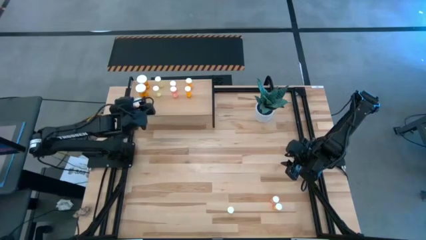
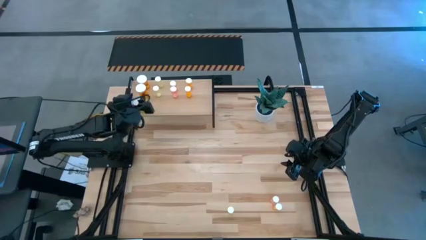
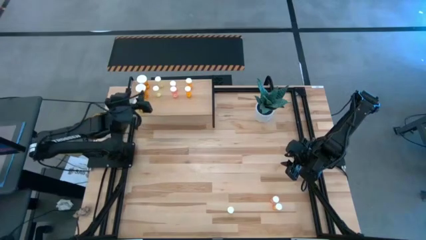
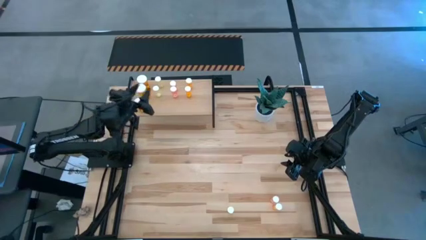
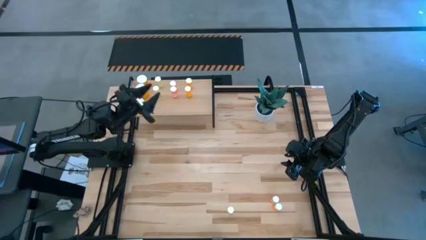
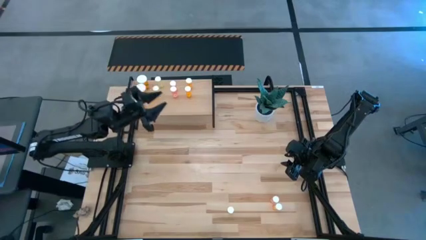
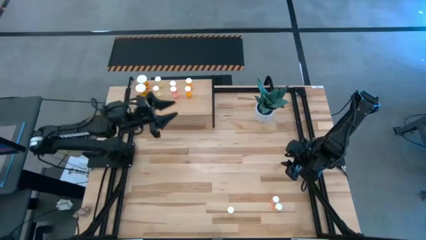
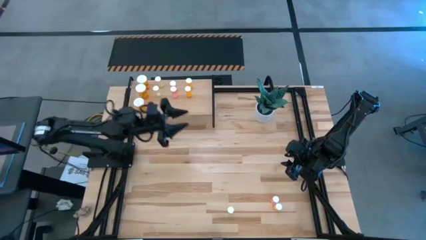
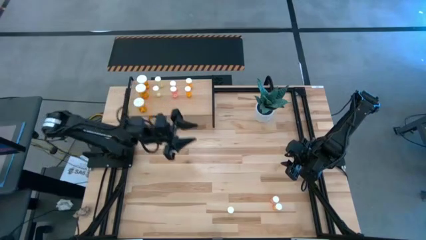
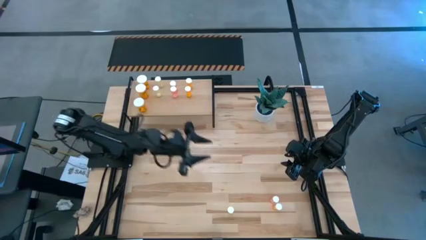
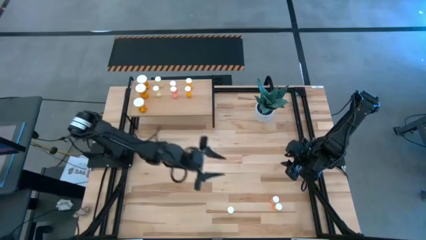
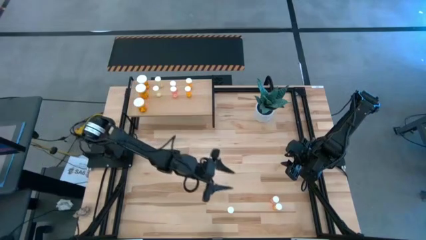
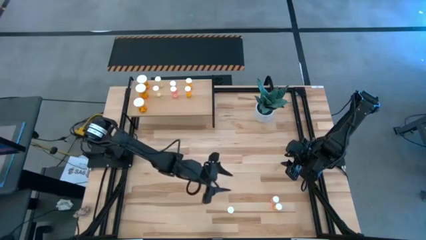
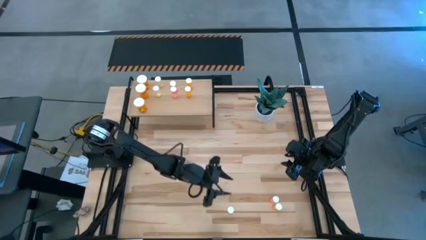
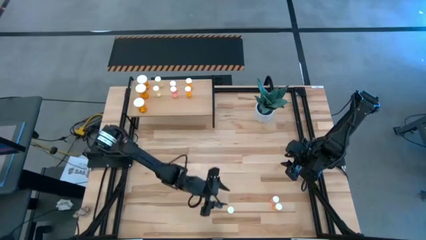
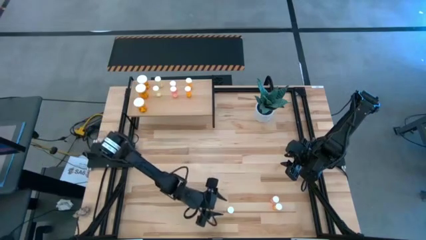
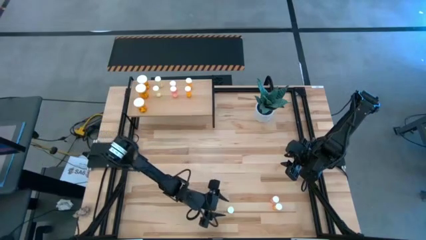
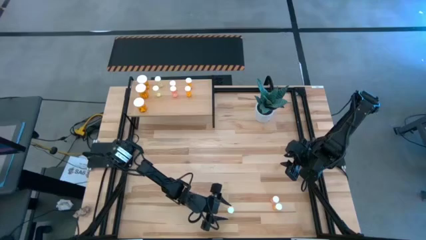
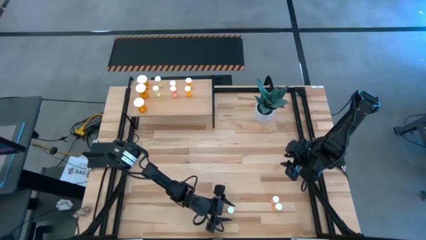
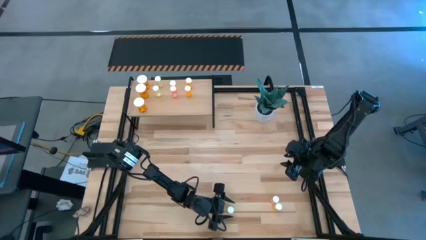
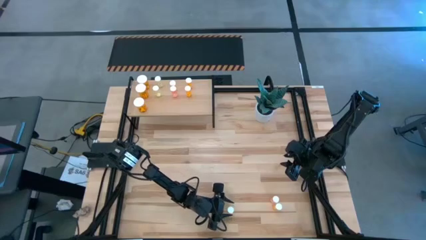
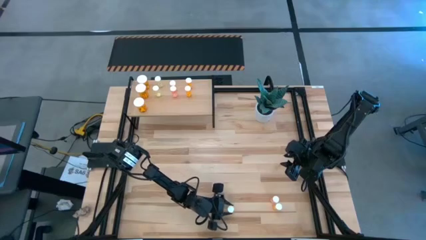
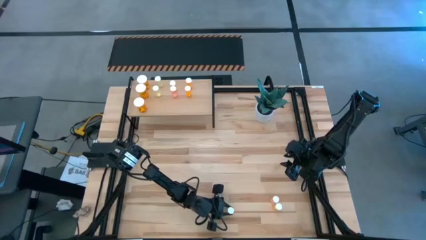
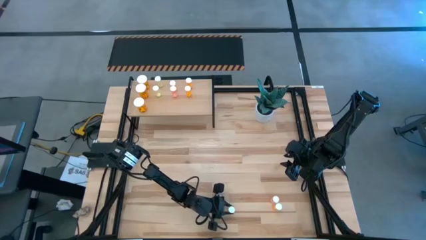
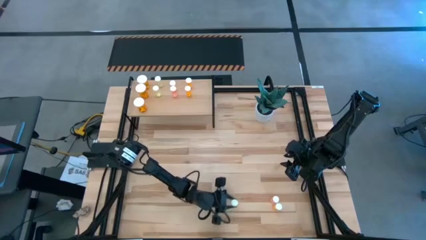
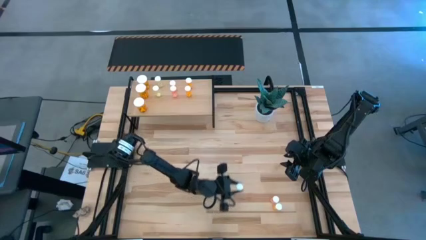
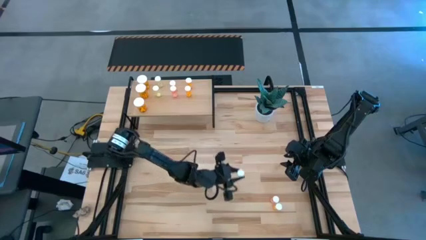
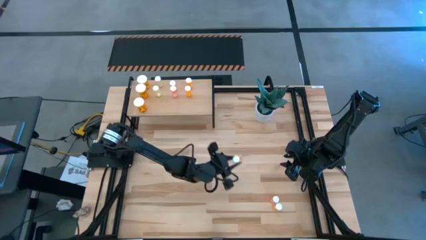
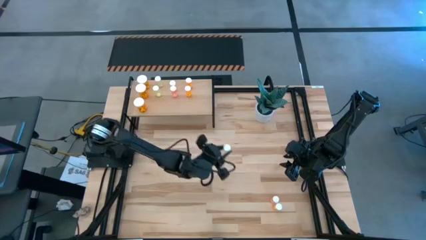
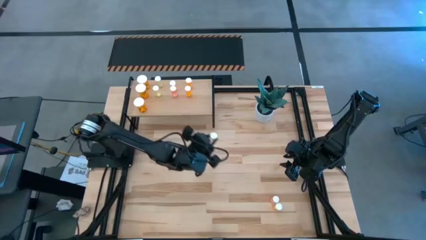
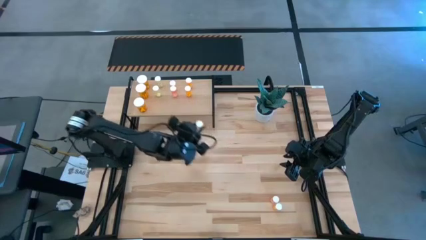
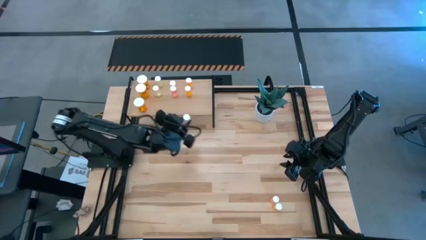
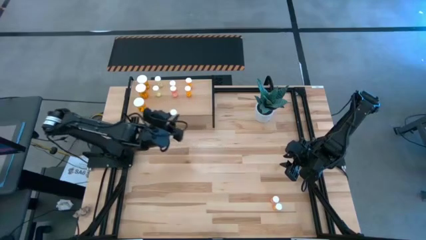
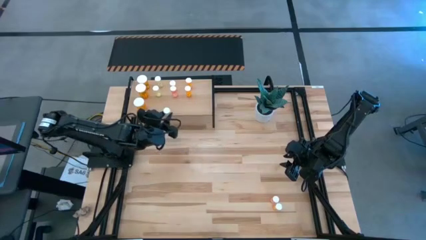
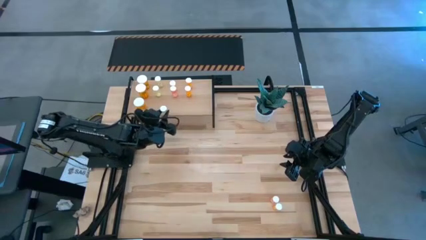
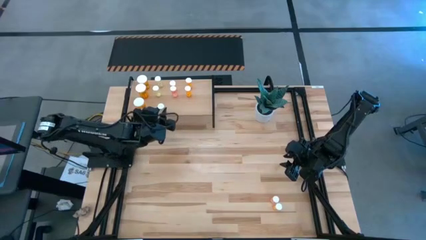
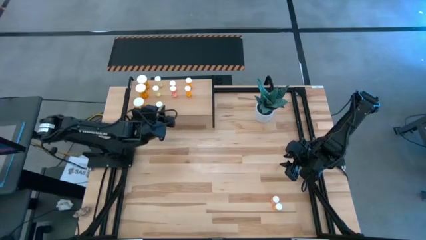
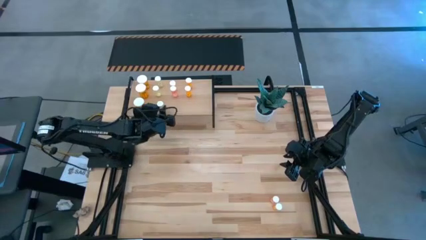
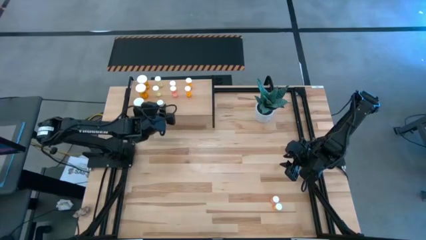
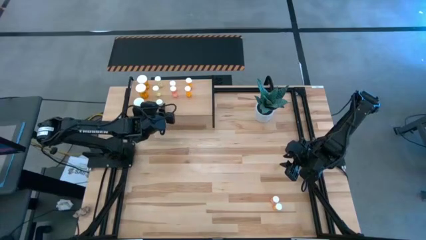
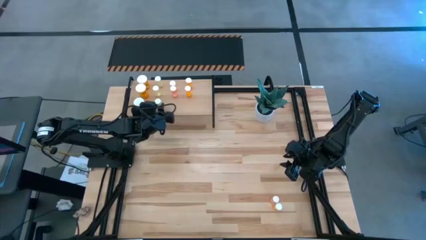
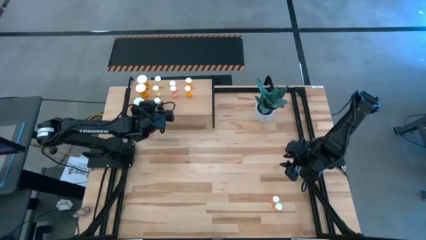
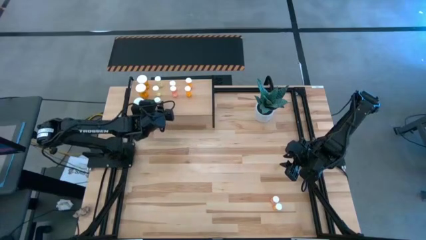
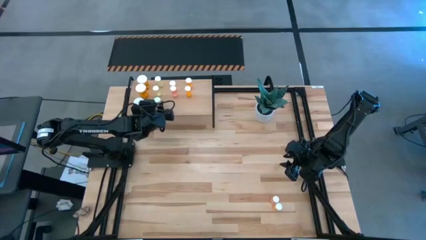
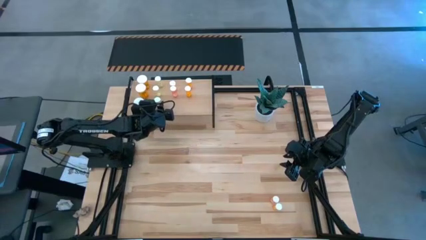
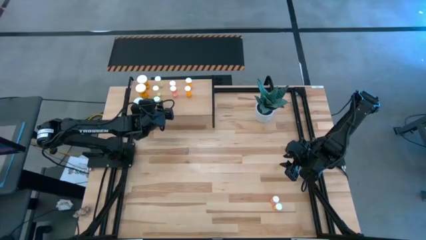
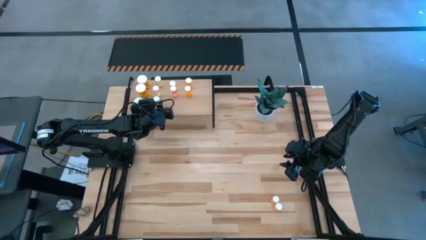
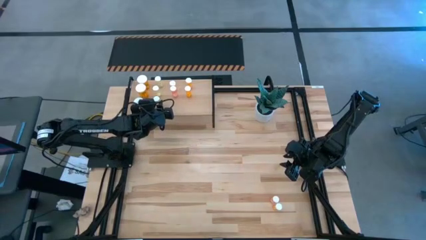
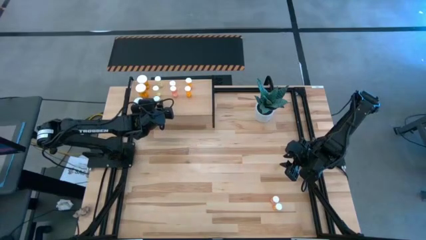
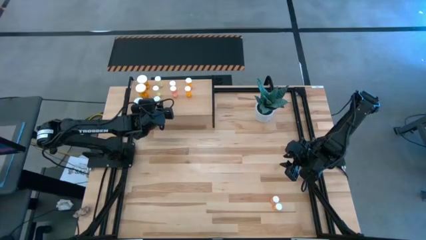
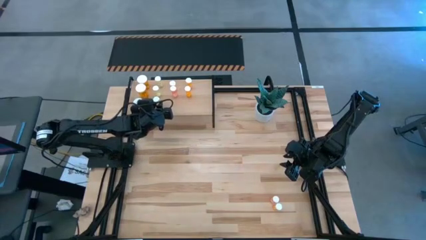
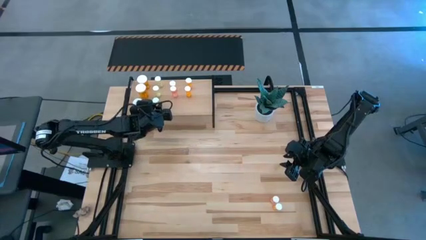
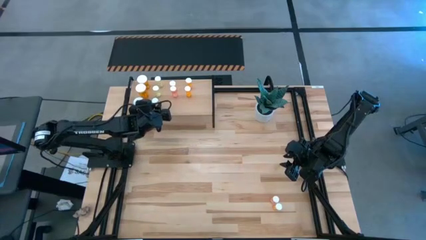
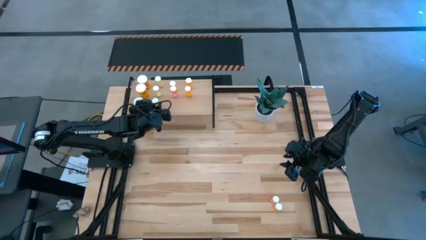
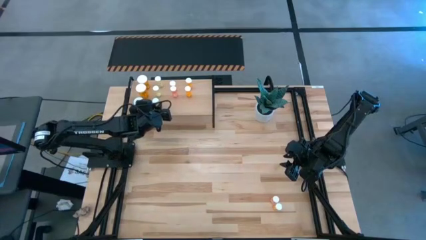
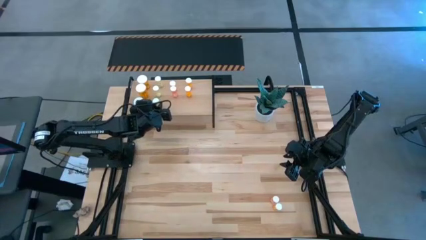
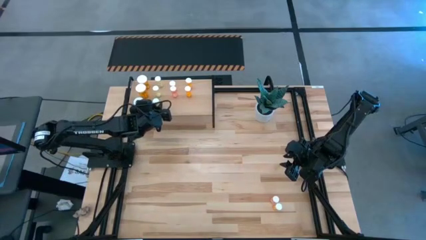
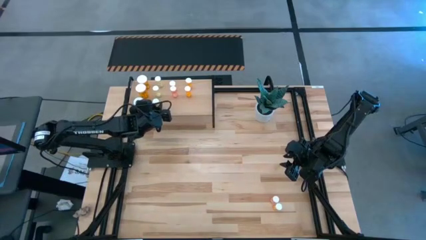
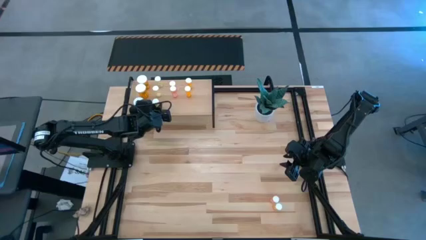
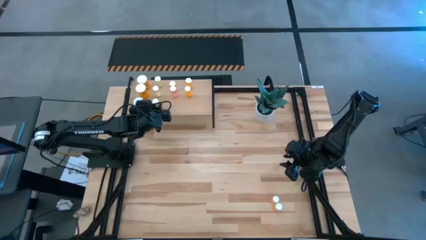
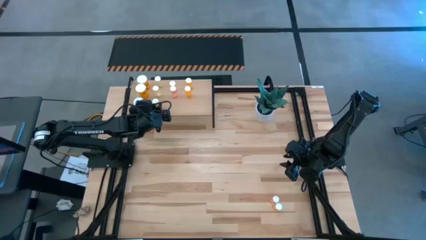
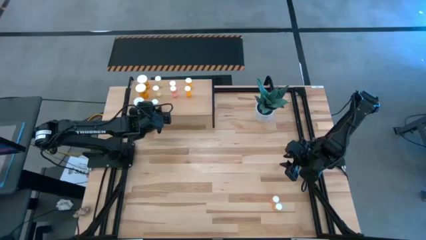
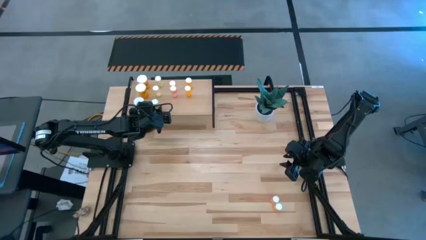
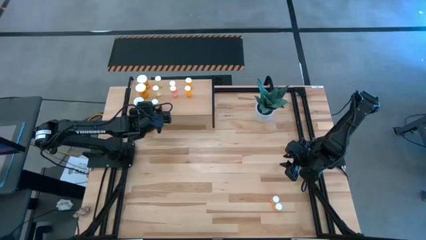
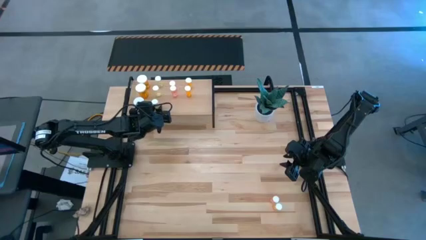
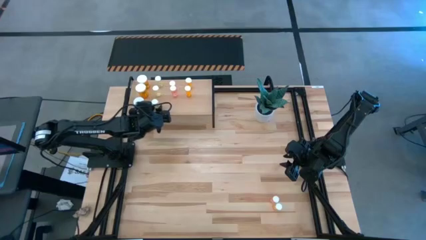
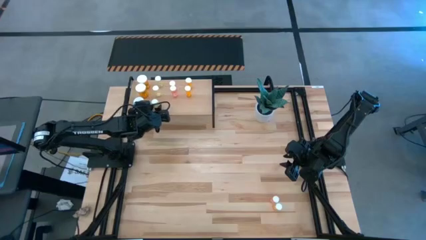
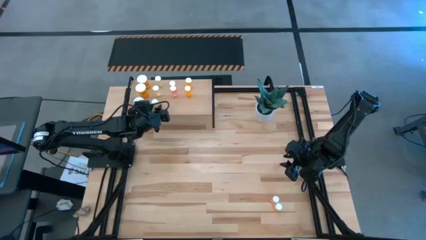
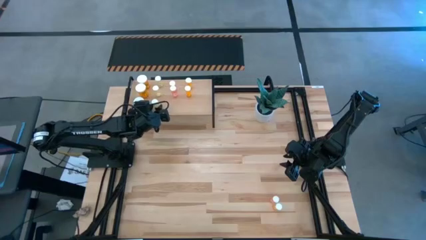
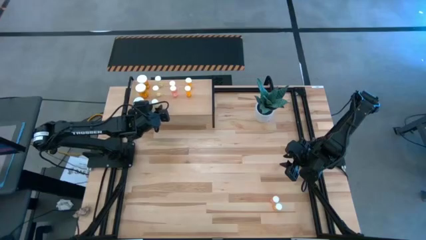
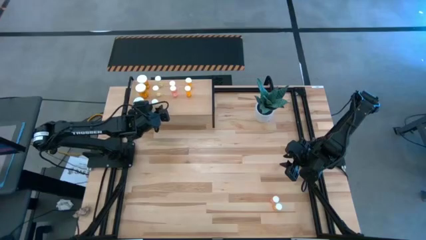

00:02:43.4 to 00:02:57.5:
Task: Pick and place medicine bottles onto shelf by color
Put the yellow pill bottle on the shelf aligned with the other yellow pill bottles
